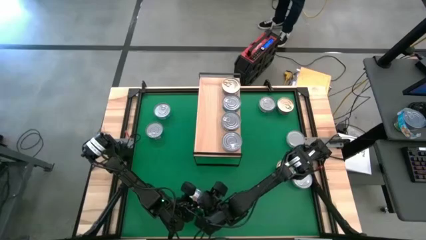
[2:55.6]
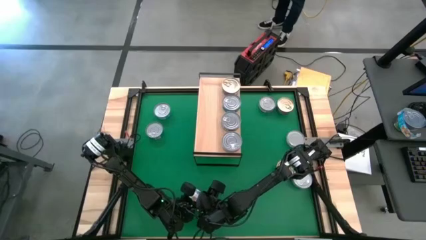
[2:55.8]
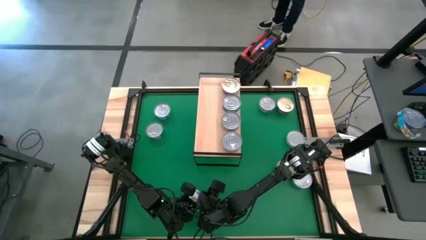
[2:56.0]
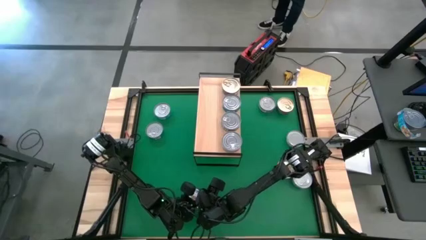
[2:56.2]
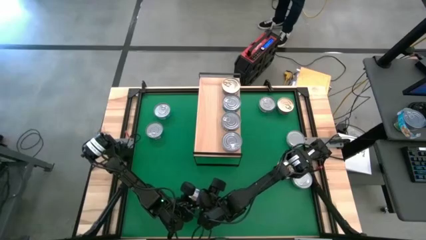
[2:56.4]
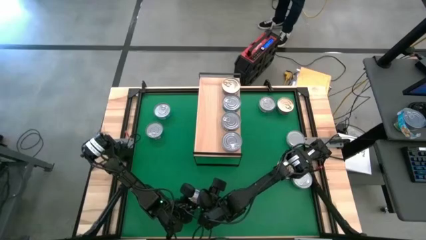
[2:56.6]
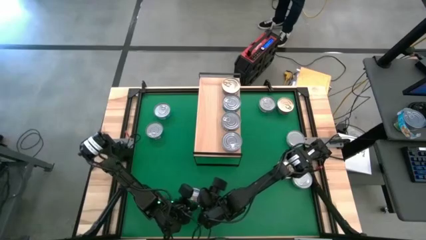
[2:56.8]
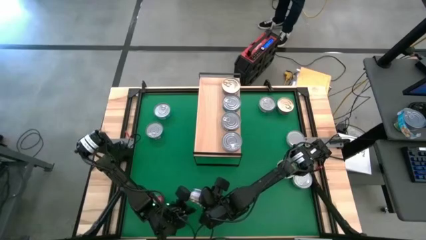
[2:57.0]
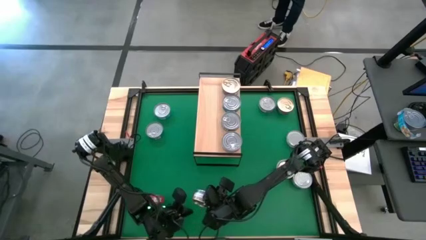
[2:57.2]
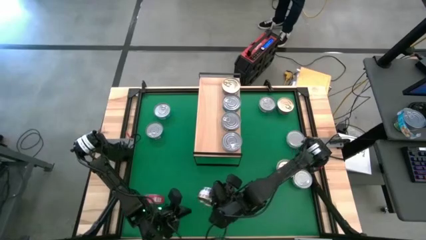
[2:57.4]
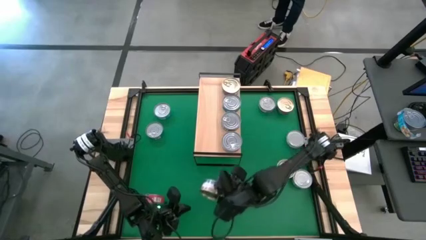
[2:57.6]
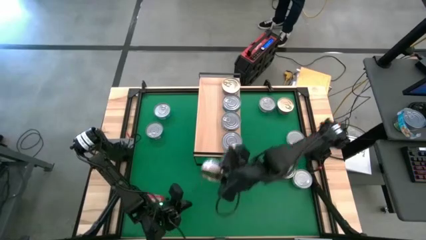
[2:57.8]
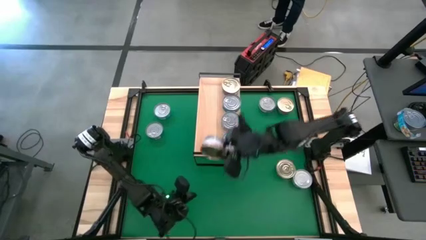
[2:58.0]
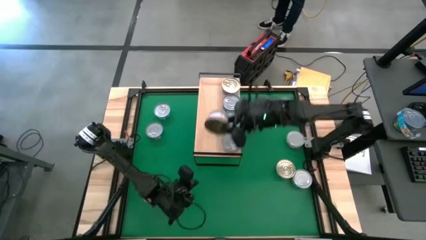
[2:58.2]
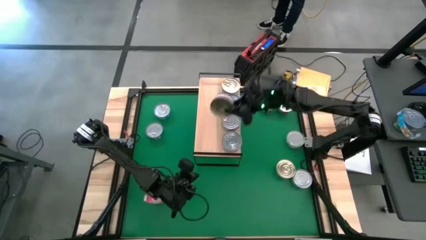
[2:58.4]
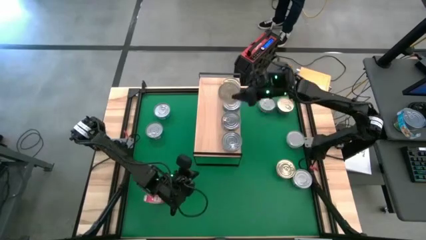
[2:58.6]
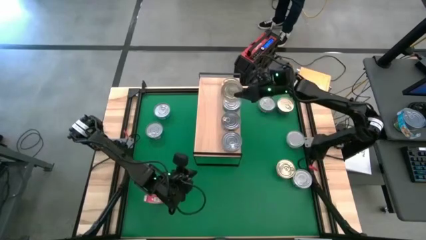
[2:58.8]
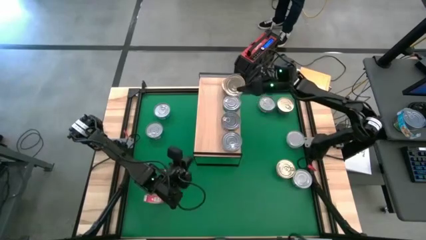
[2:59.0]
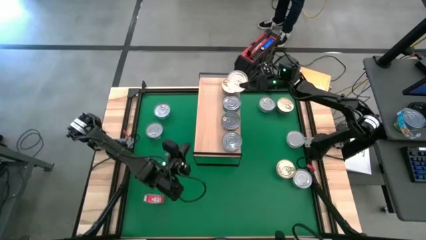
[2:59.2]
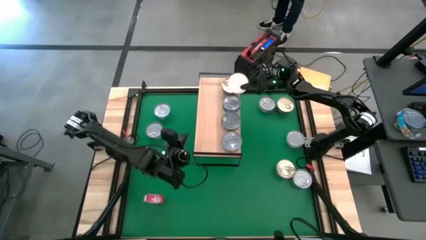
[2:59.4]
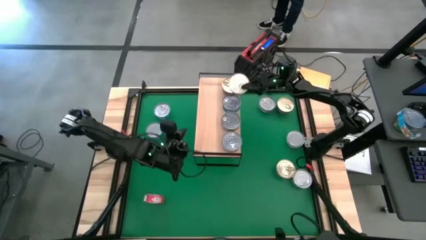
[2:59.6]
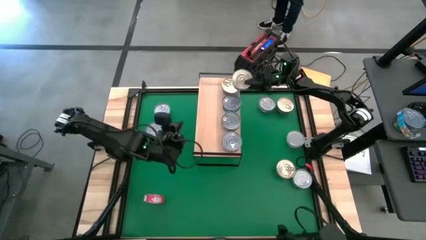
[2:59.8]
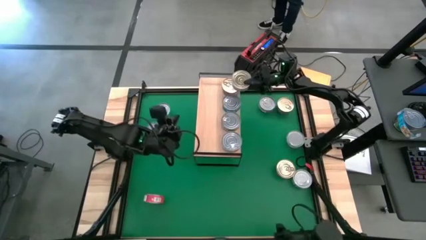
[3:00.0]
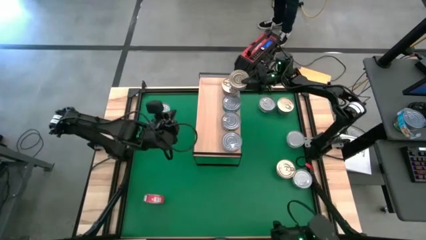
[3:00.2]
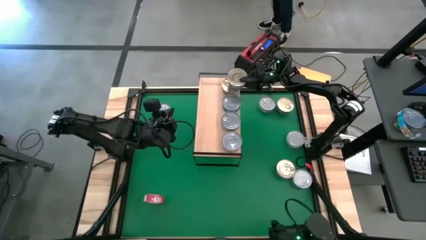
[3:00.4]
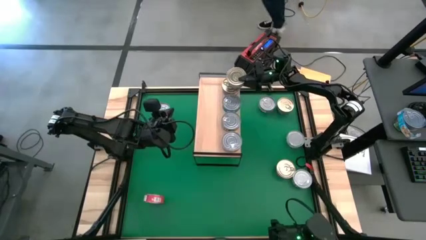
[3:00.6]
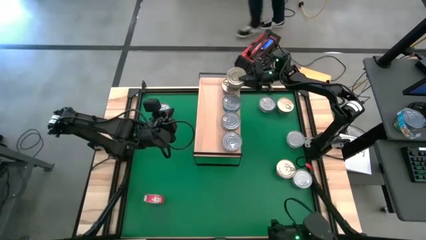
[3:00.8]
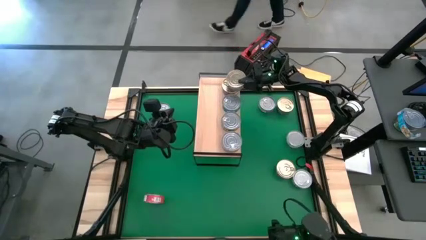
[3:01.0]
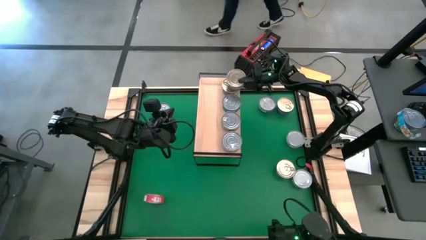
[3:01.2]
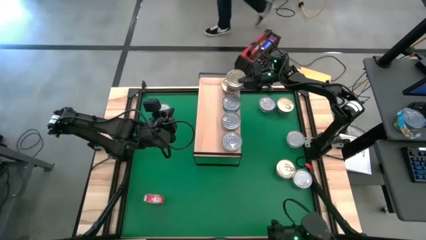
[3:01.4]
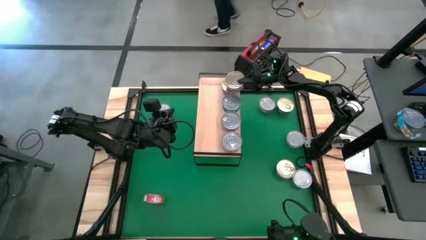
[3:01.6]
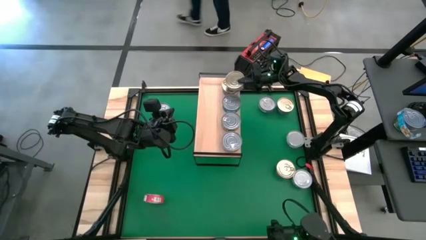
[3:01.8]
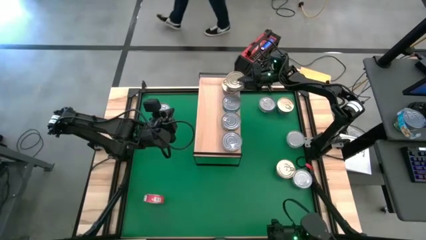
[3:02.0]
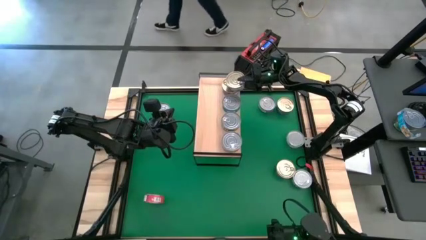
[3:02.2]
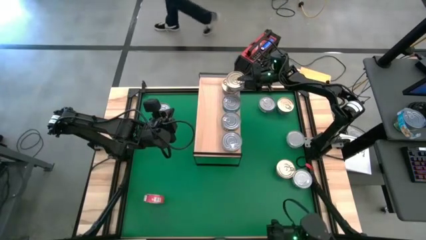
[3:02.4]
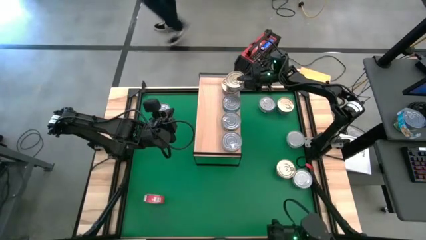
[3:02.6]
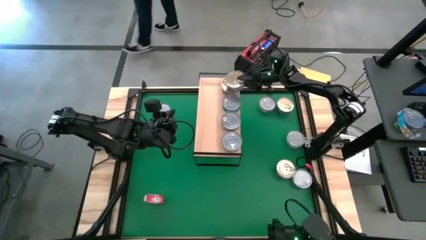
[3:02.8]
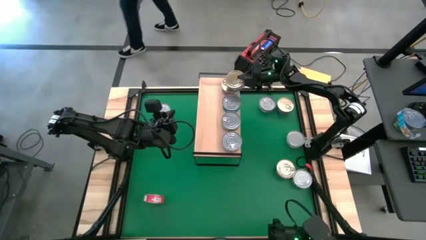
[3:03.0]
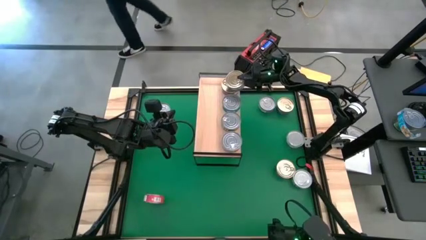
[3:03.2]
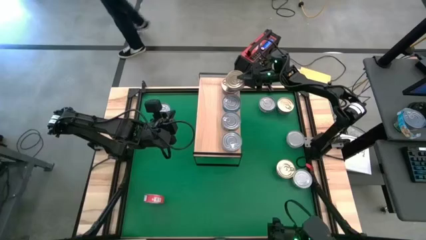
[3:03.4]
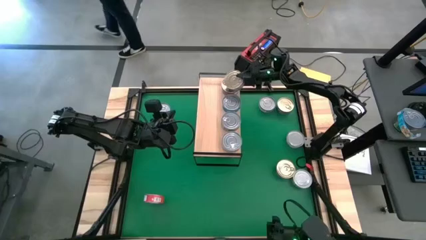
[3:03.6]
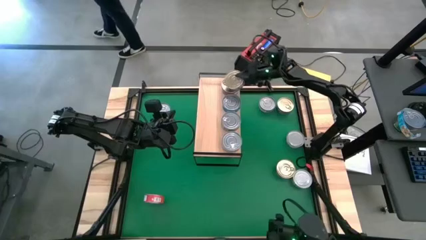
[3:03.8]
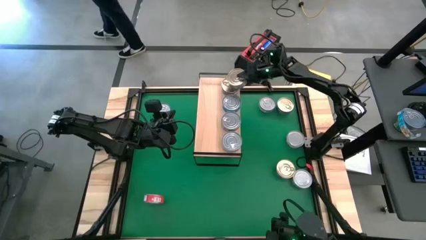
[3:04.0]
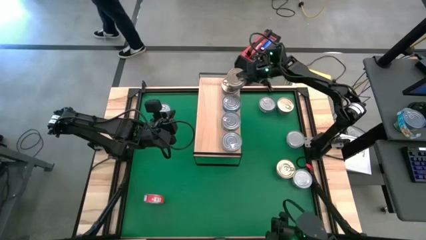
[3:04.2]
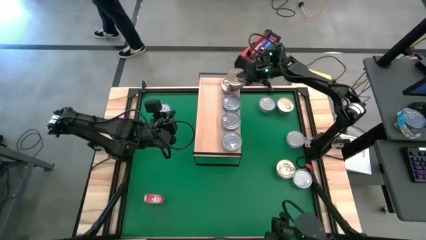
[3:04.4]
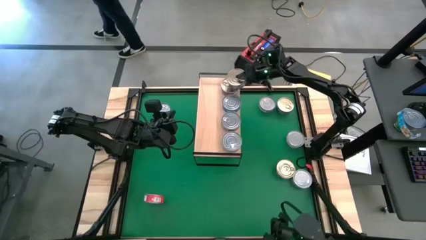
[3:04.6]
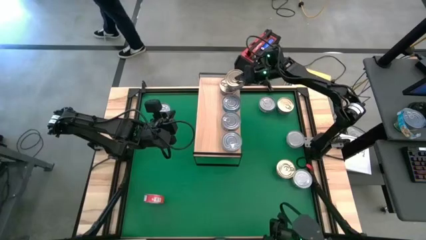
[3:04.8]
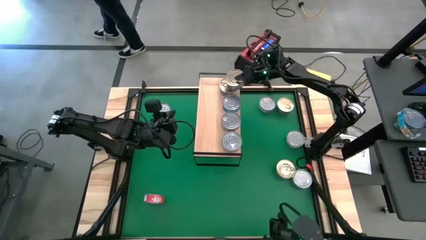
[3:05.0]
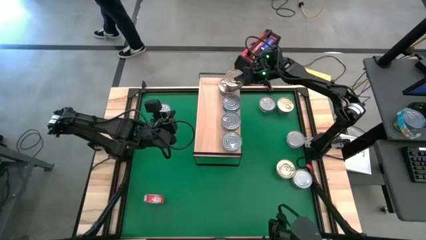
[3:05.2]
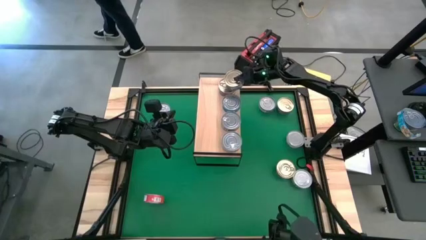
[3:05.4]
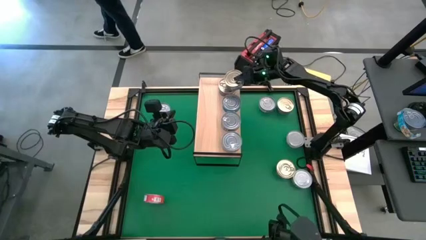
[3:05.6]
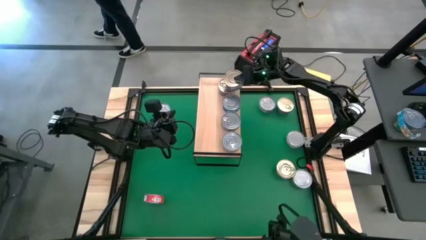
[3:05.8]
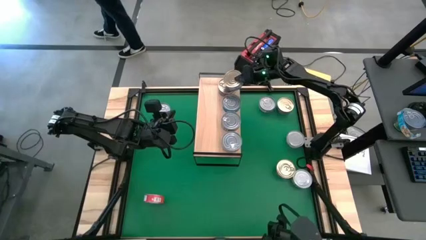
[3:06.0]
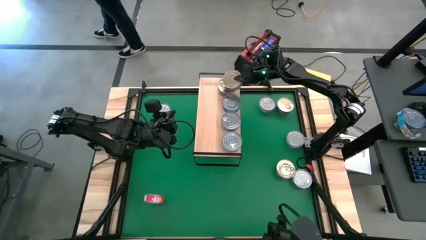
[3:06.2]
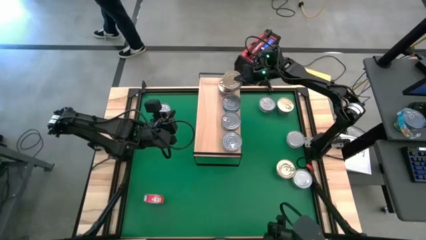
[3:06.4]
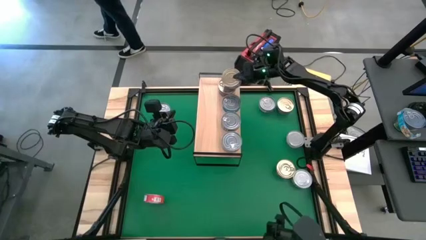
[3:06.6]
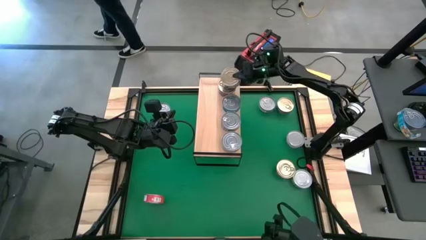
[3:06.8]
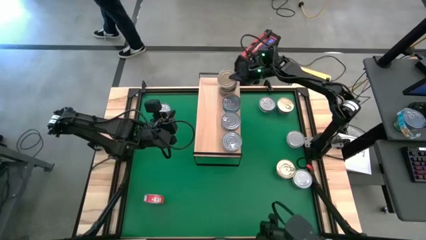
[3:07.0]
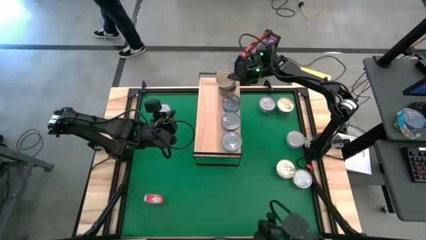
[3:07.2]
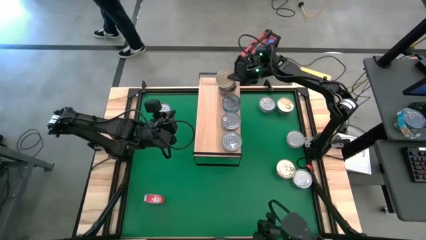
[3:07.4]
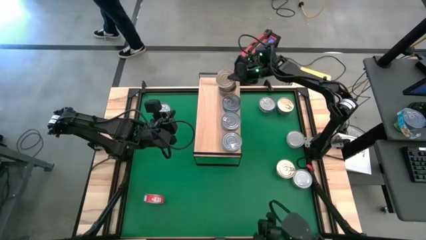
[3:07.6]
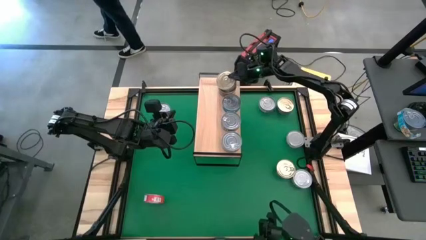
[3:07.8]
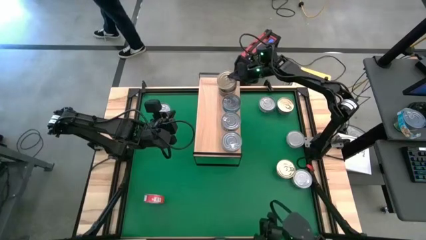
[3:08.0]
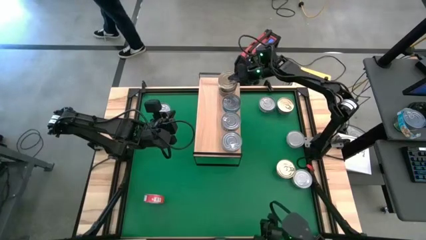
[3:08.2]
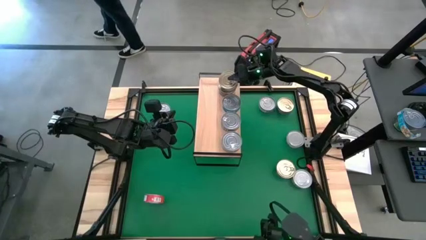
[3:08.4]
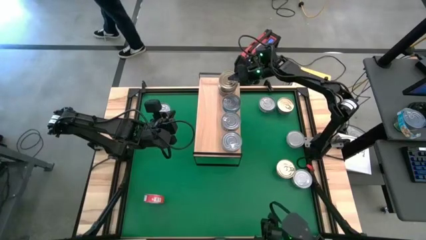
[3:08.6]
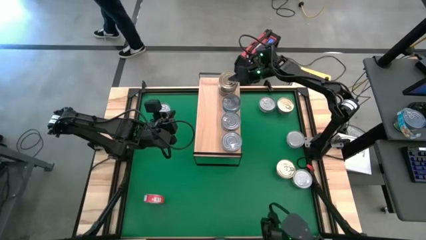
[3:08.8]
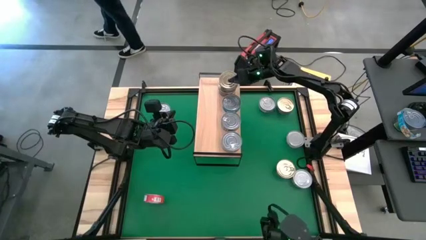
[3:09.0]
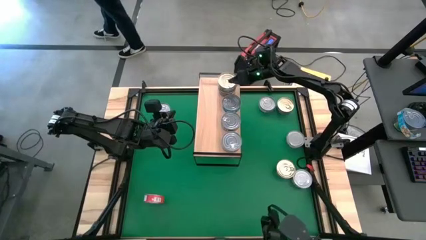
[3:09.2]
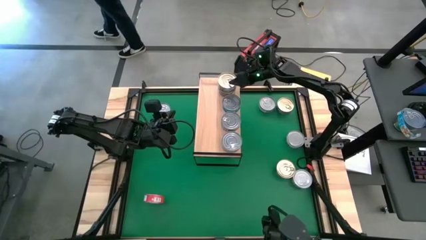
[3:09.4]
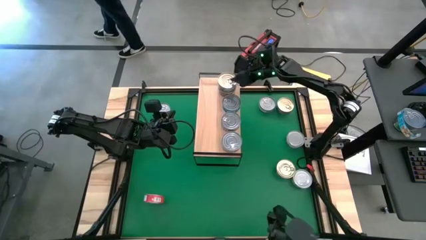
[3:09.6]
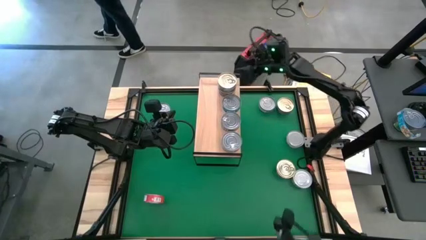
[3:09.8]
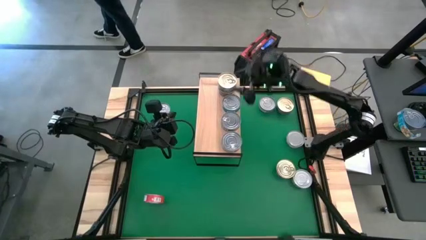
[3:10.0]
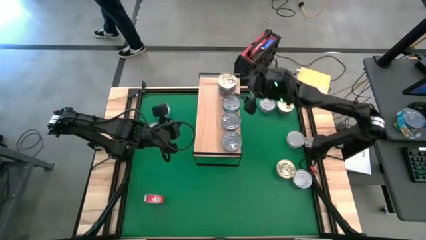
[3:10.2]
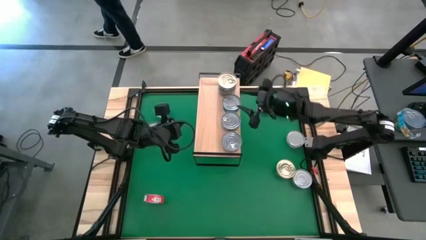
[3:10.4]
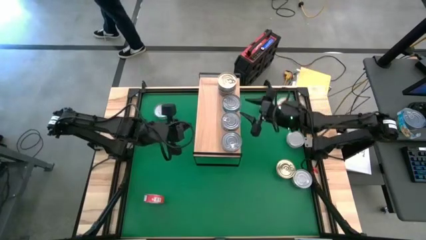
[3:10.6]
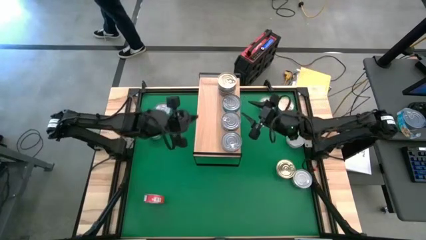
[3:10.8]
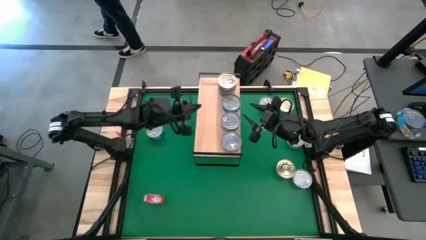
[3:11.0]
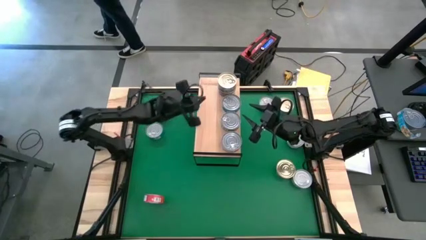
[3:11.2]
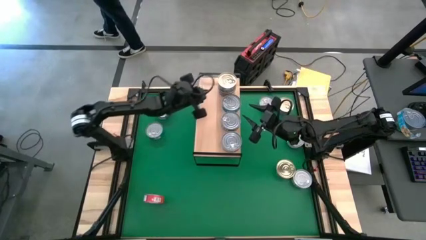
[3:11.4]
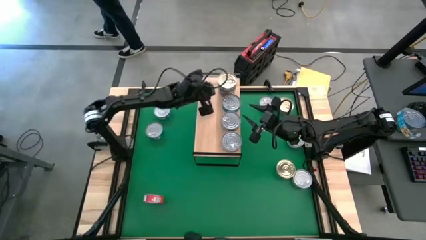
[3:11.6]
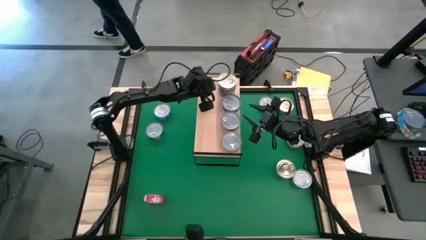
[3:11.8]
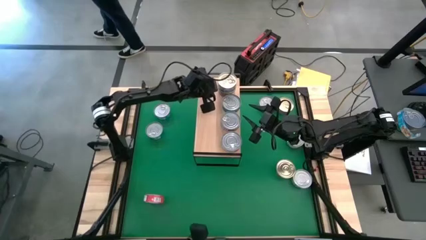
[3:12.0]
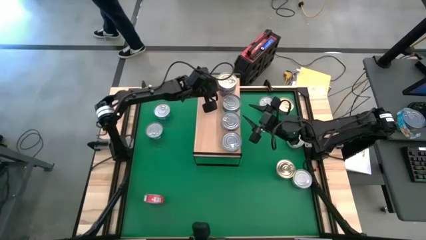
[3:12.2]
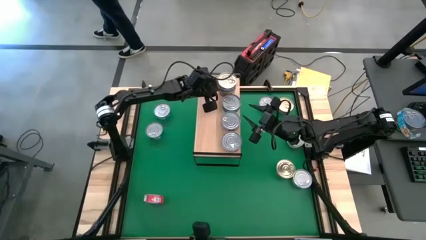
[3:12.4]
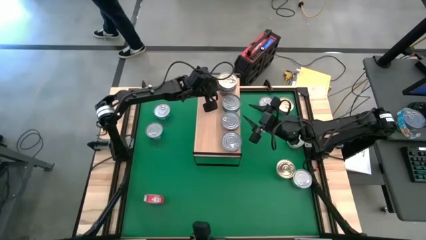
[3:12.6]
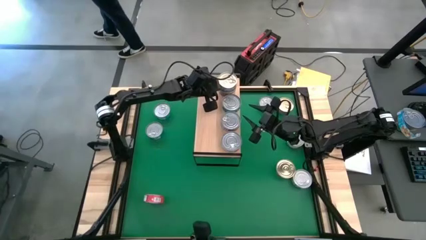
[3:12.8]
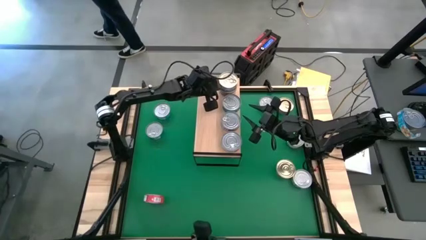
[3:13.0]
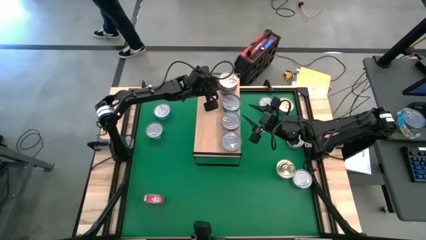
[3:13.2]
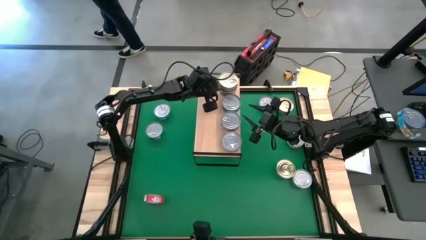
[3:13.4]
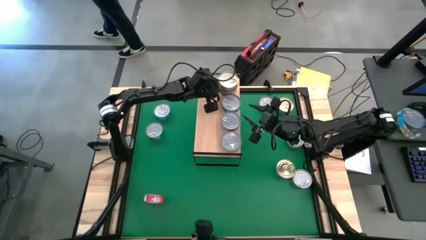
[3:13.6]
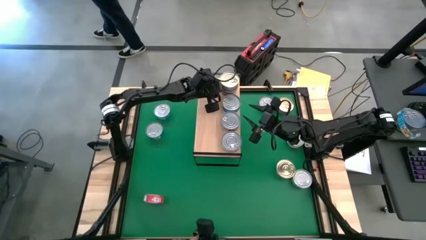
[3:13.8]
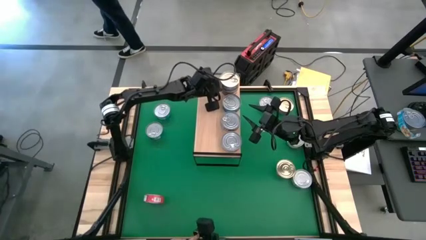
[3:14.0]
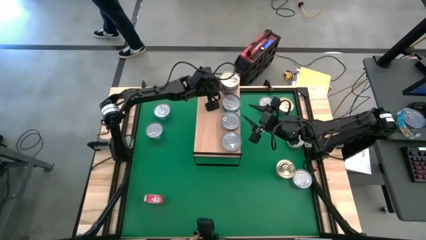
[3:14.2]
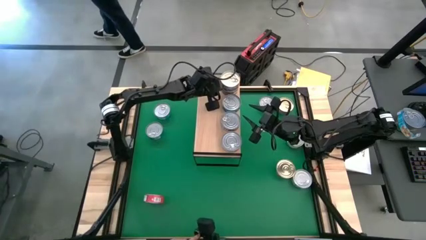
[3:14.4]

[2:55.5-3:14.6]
Task: Stack canned seafood by type on shelf
Stack the top left dark blue tuna can on top of the dark blue tuna can on the shelf
